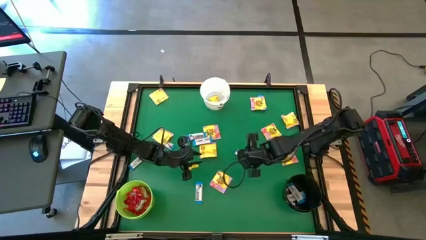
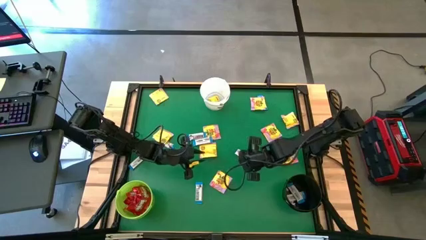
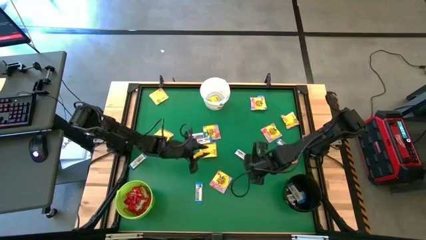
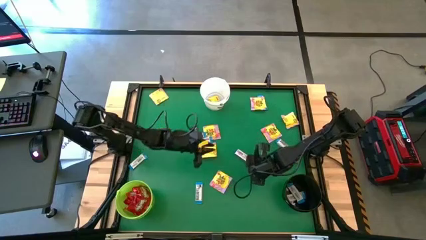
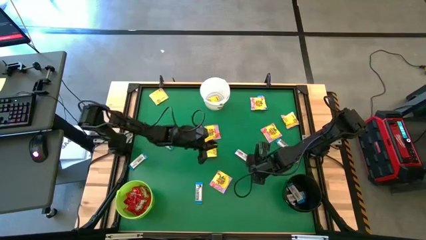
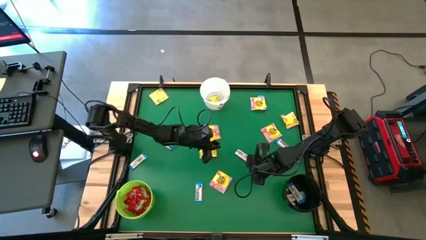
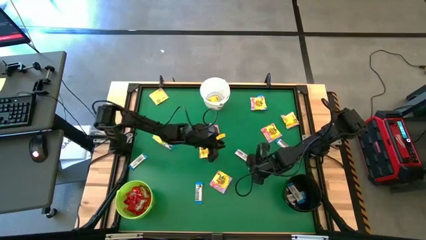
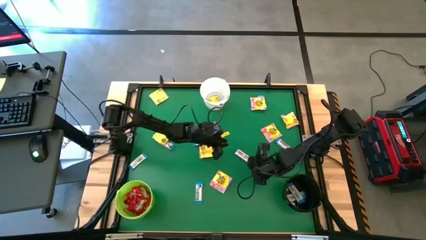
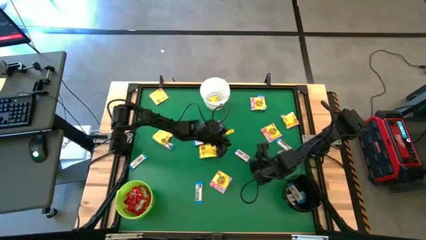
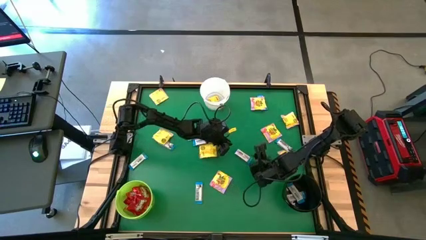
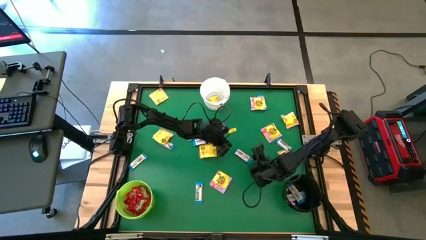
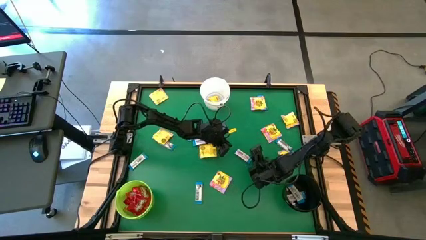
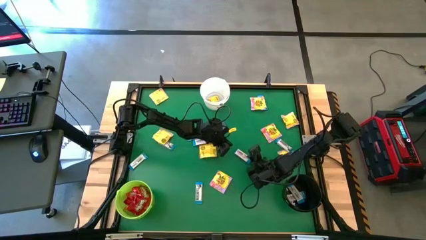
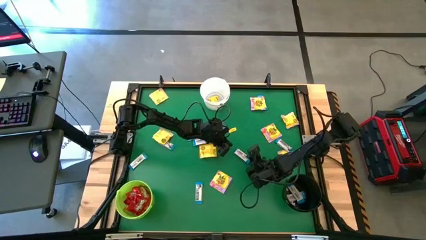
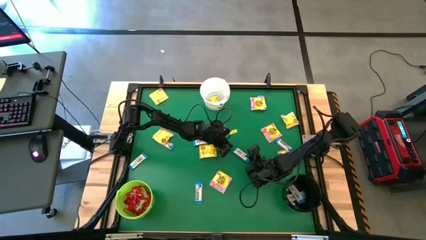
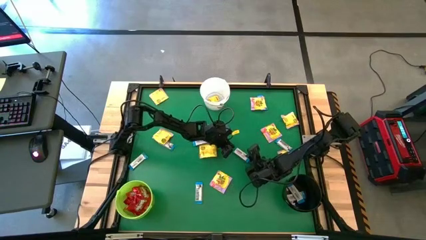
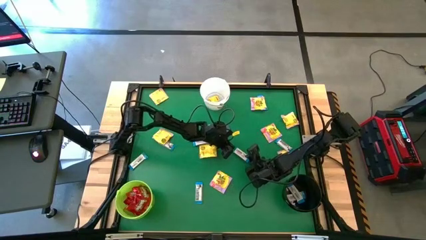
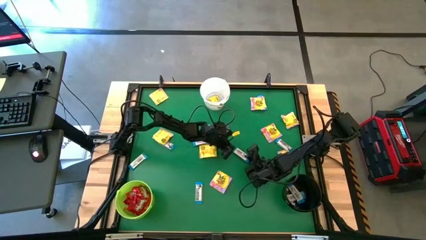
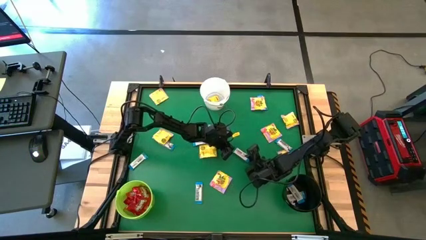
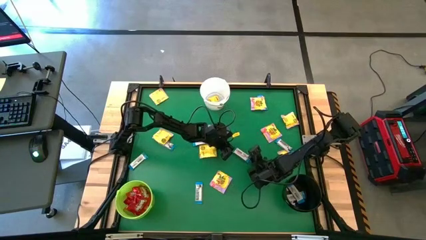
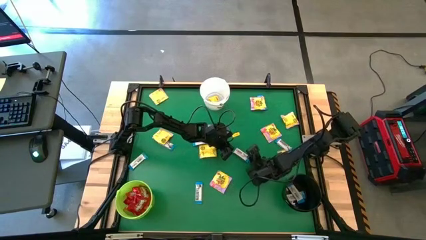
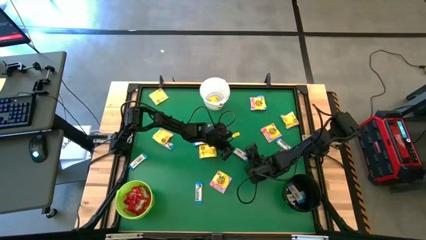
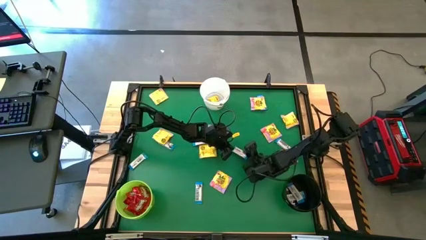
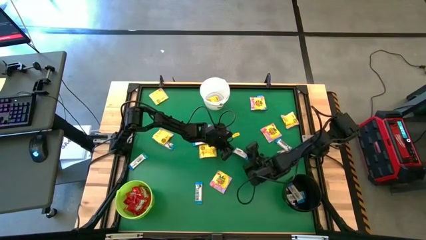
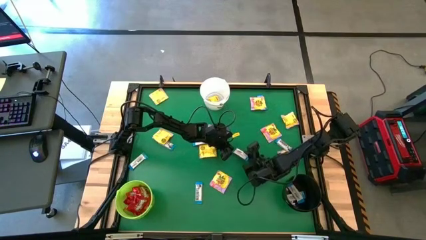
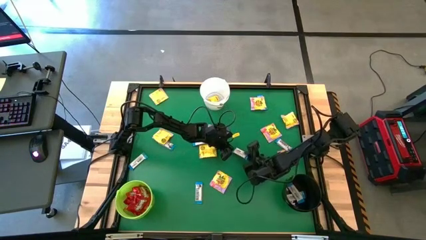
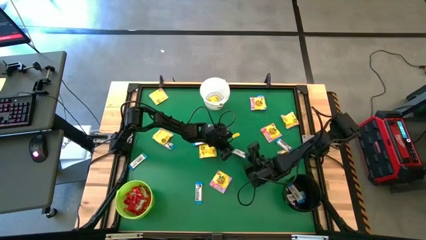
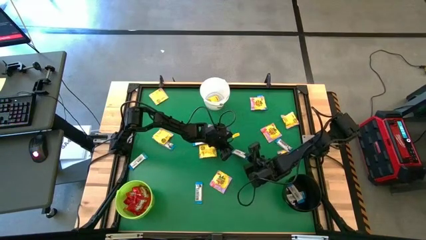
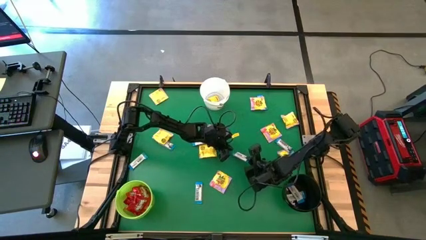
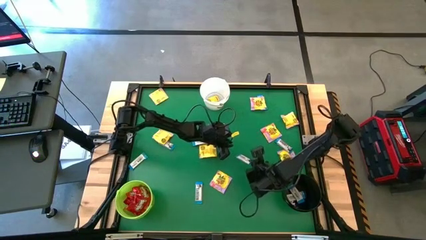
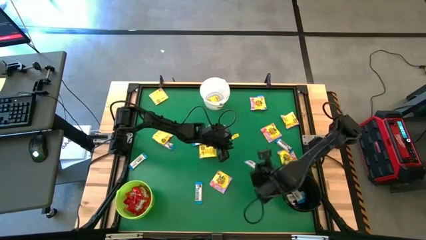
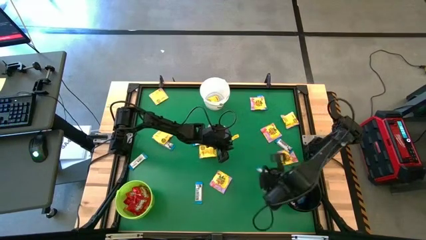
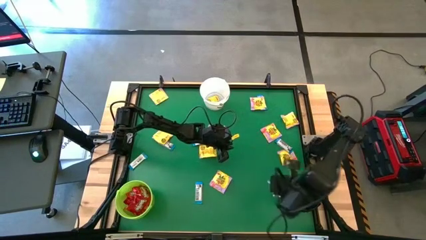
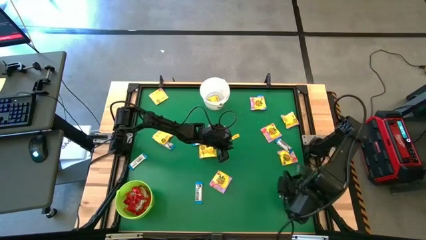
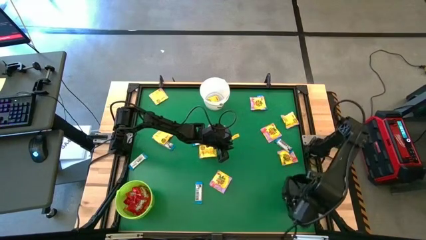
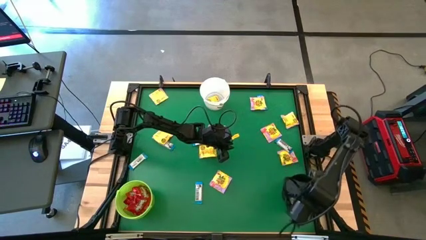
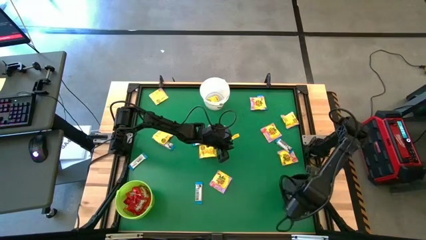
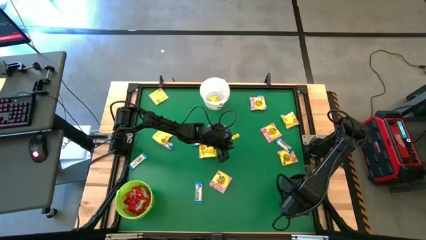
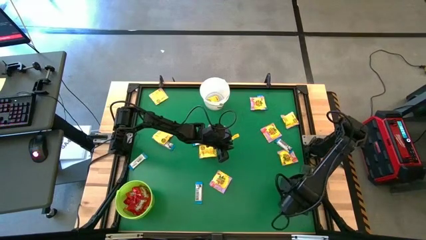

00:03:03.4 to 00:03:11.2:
Task: Sort candy by brand, put in halloween buckets
Put the white candy into the black bucket

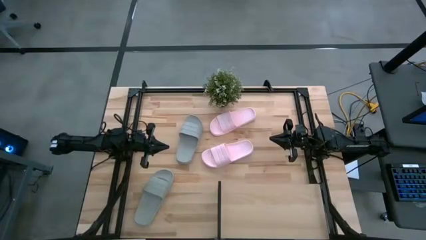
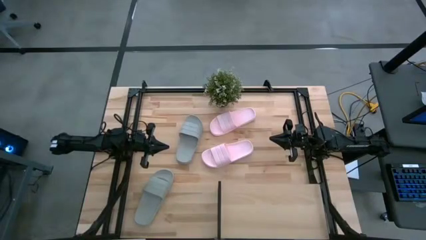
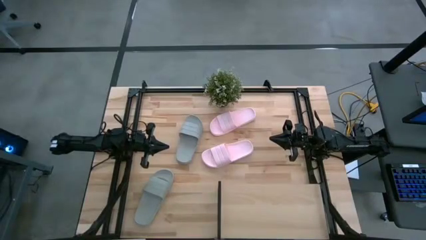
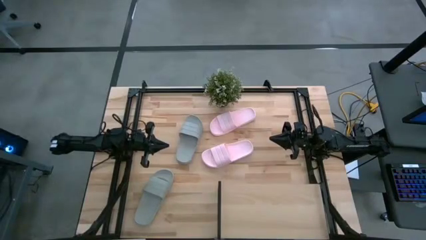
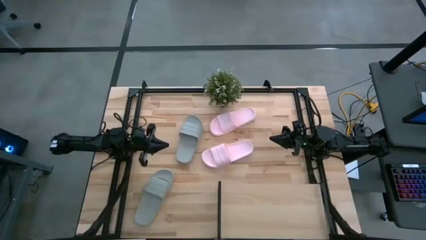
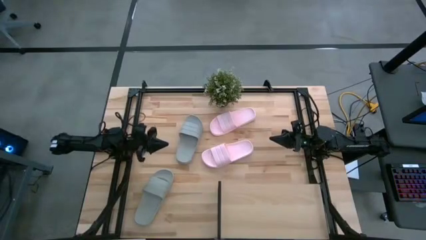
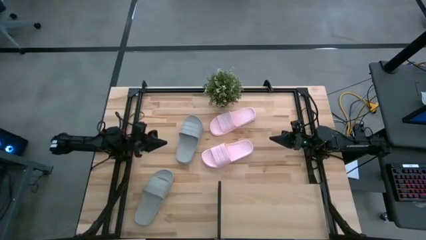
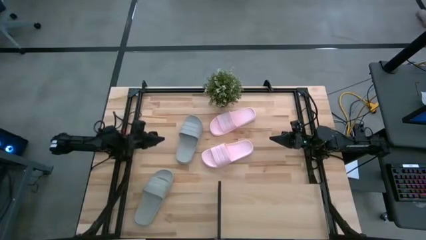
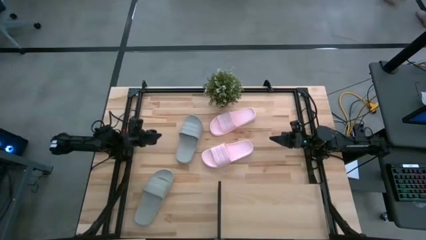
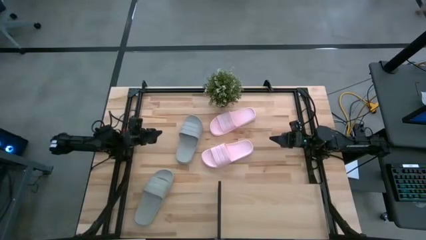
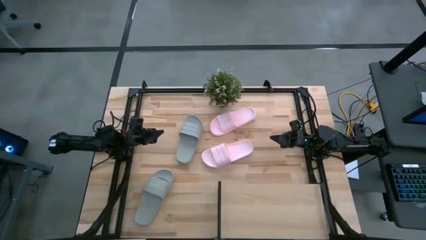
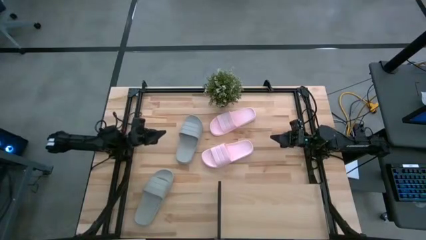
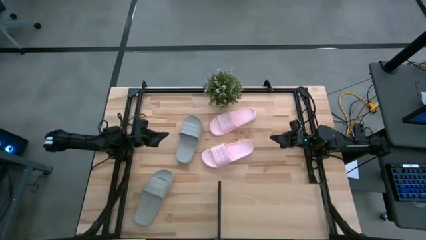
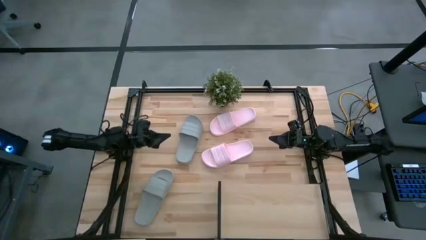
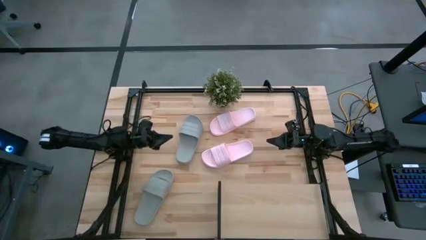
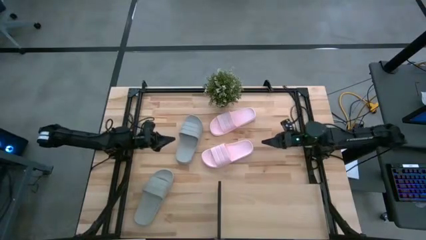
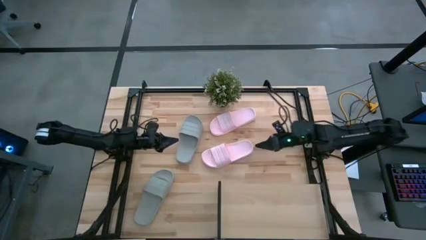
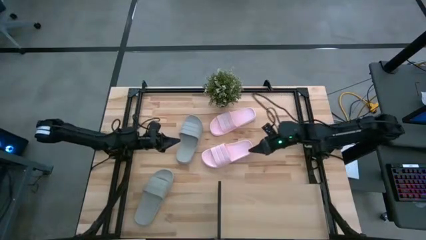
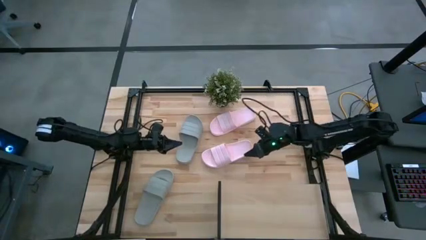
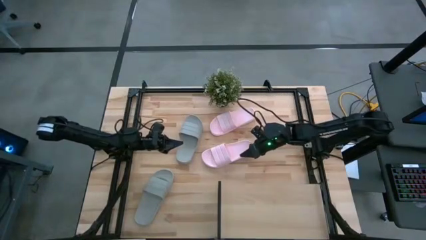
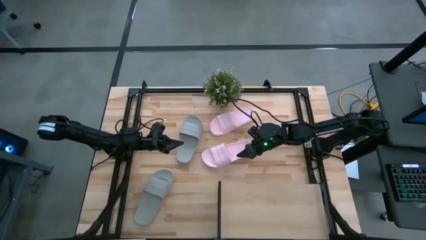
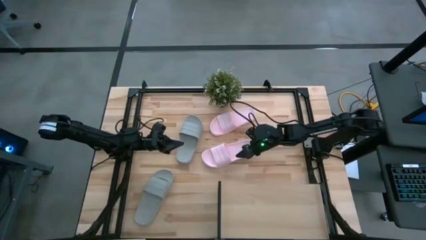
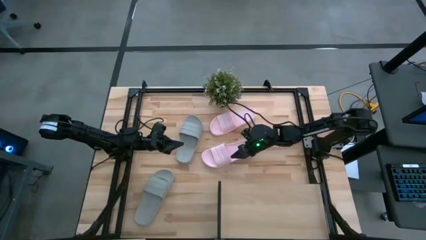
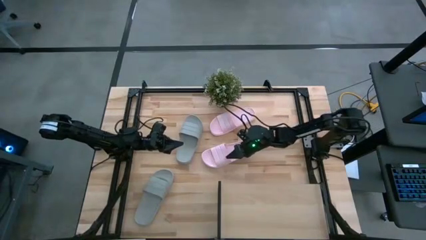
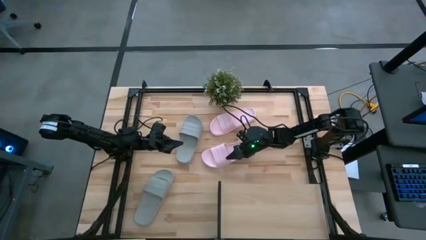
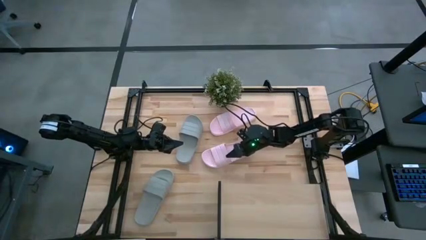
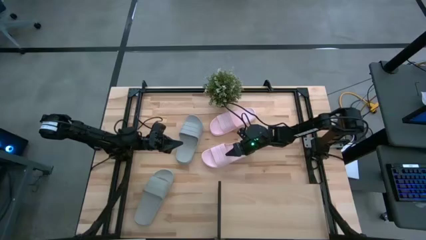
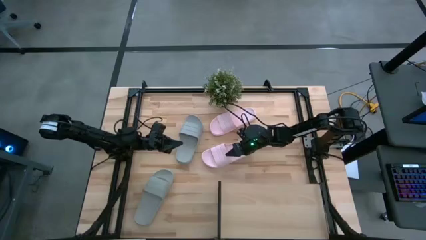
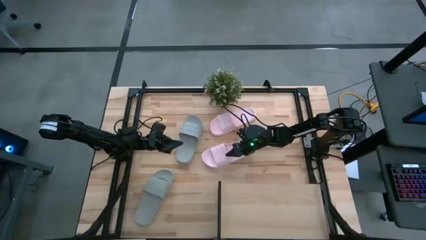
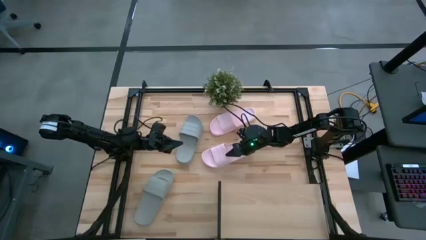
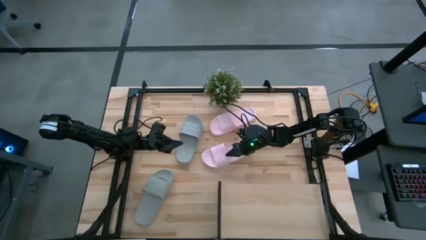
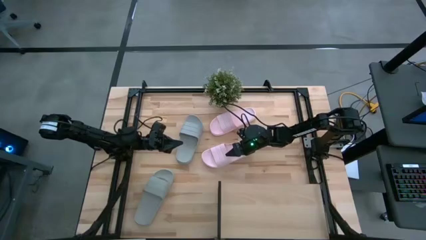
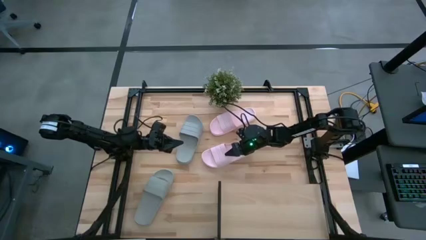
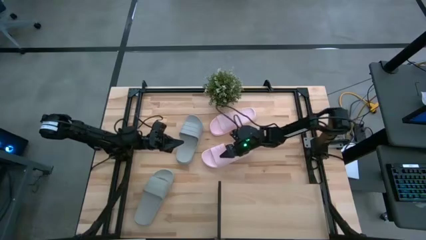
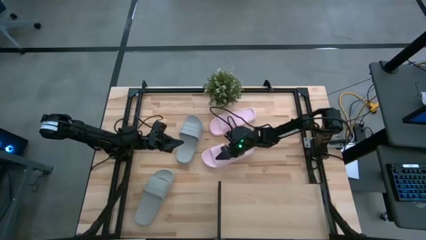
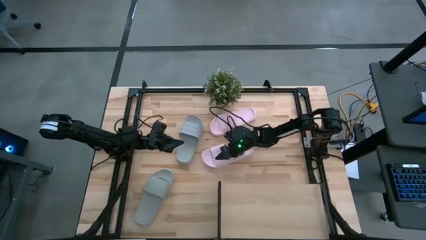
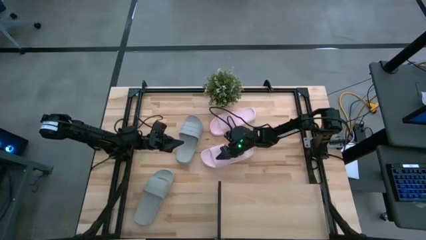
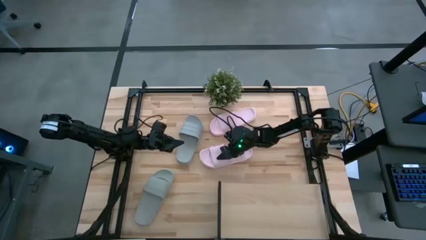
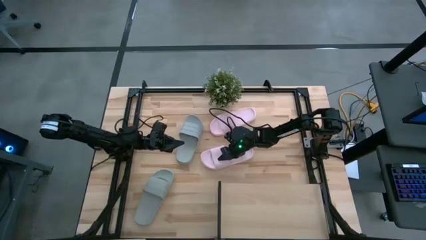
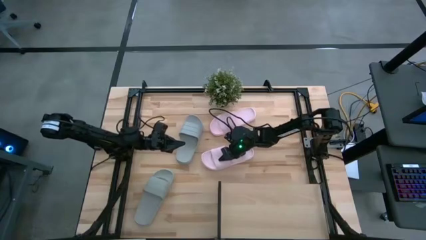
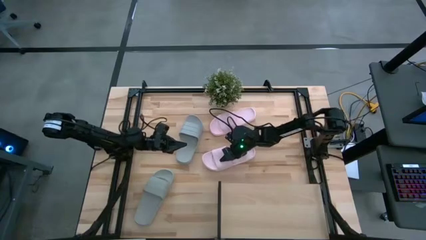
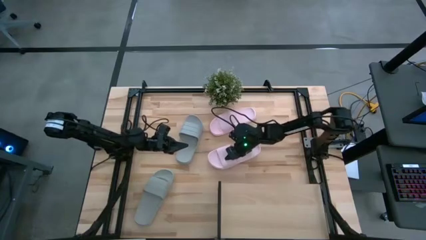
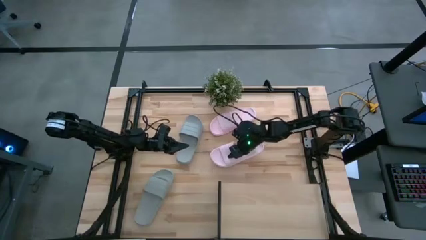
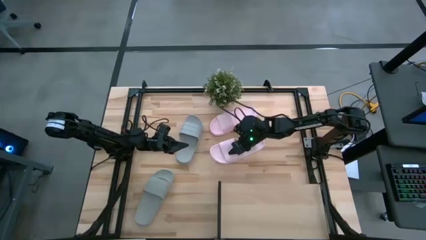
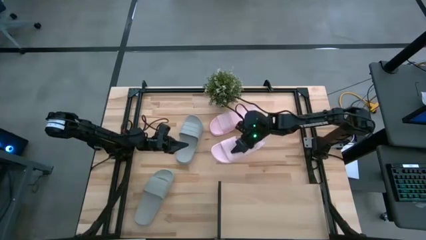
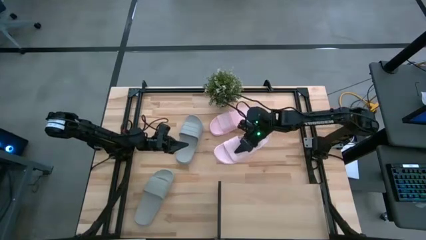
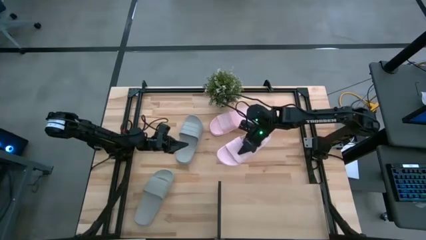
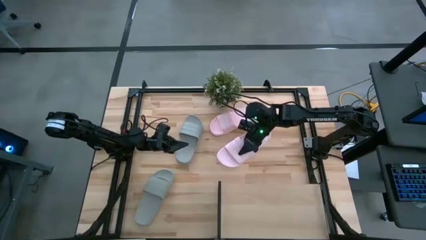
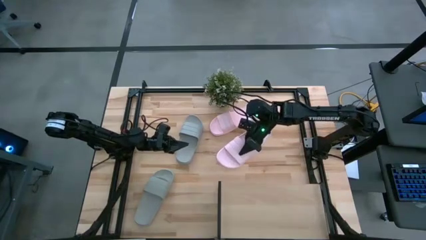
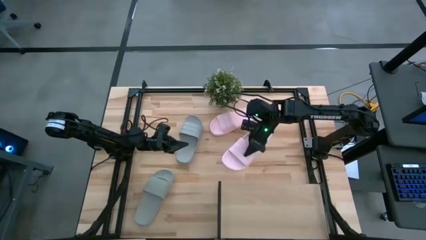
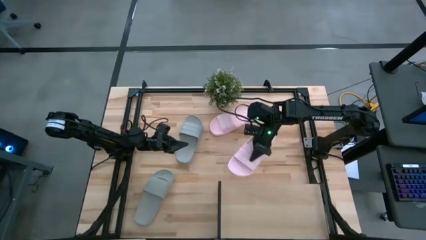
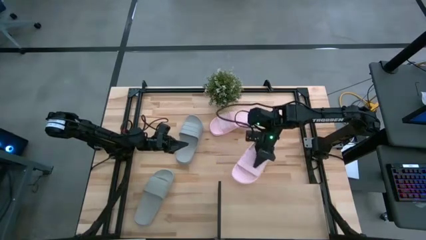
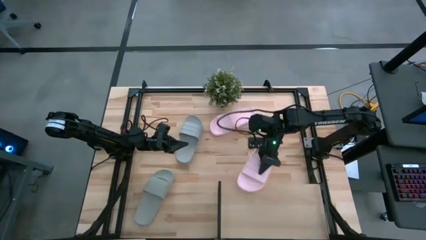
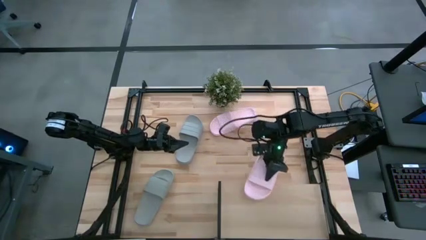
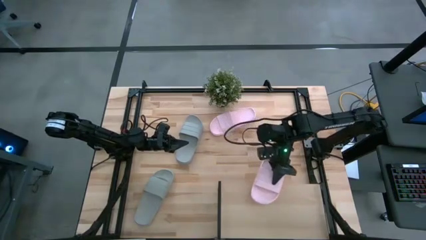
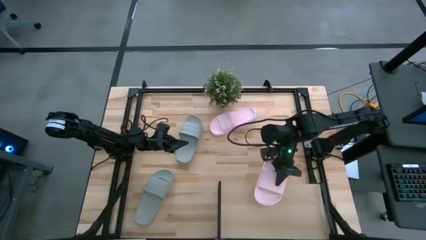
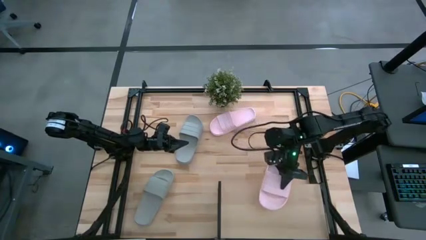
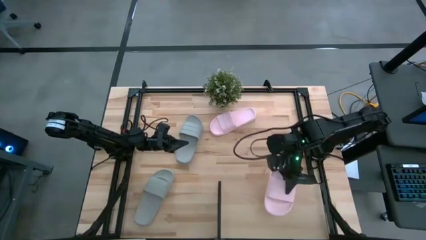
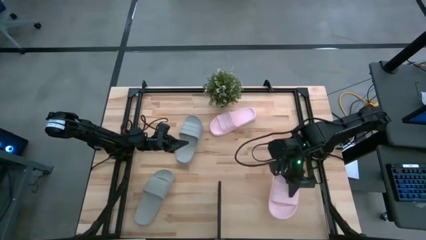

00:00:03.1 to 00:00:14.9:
Task: Pick and place slides into the shelf
Put the bottom pink slide on the shelf
